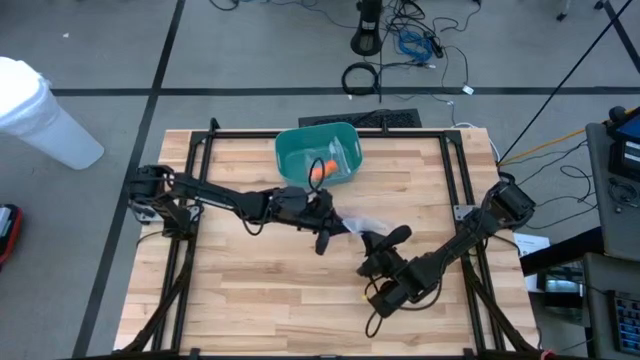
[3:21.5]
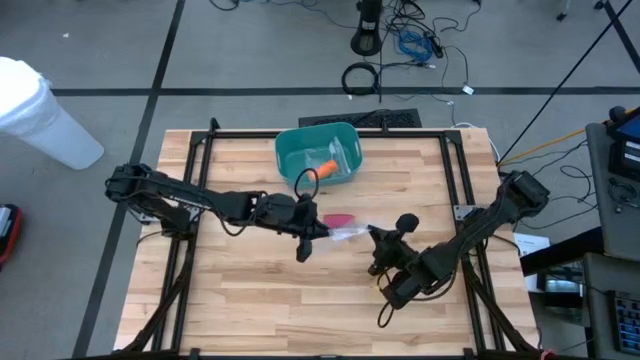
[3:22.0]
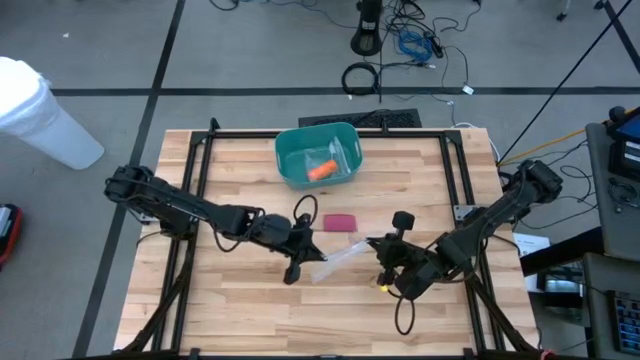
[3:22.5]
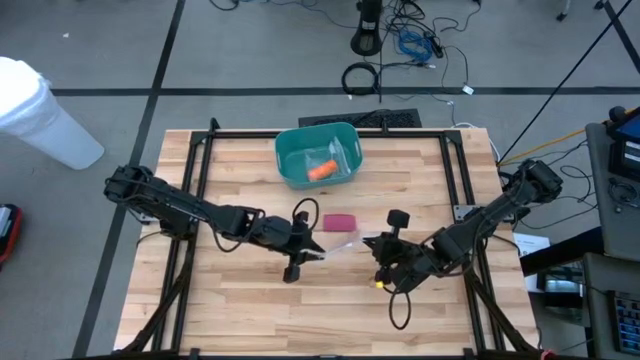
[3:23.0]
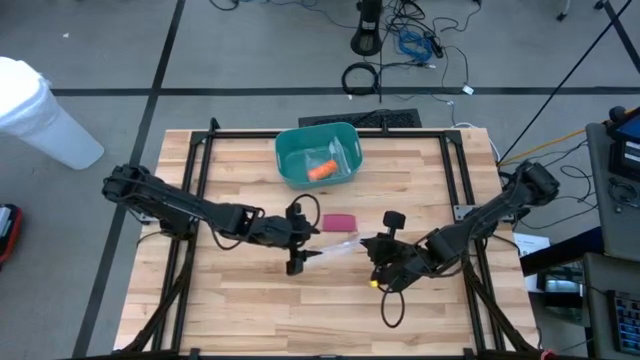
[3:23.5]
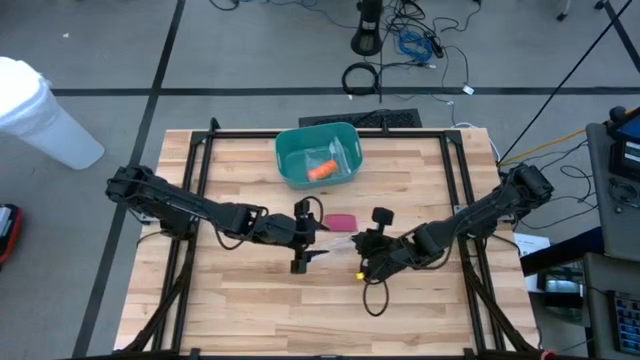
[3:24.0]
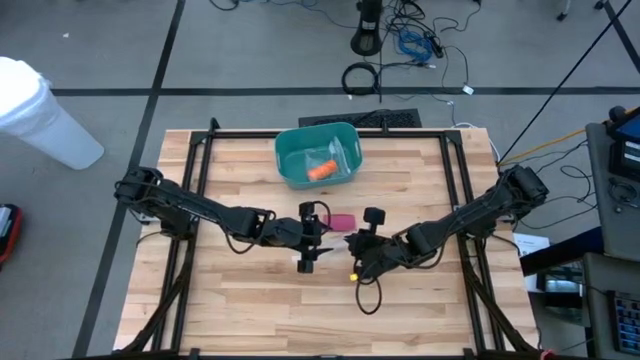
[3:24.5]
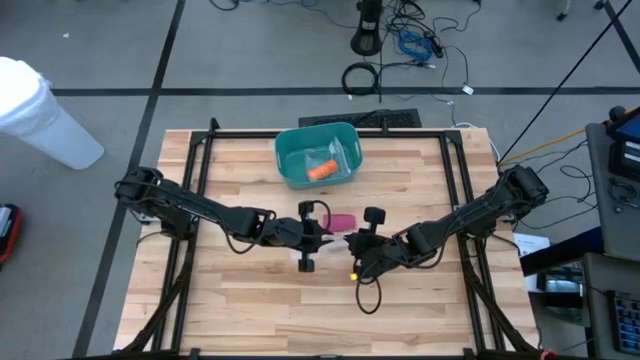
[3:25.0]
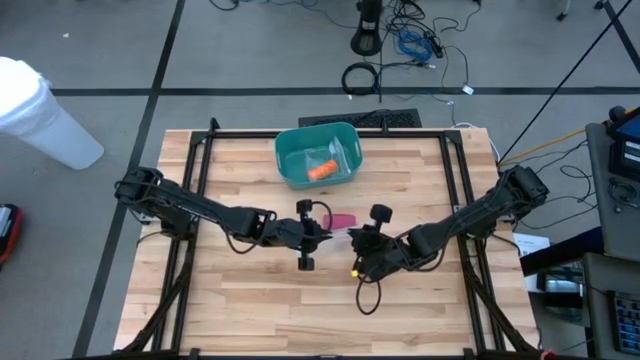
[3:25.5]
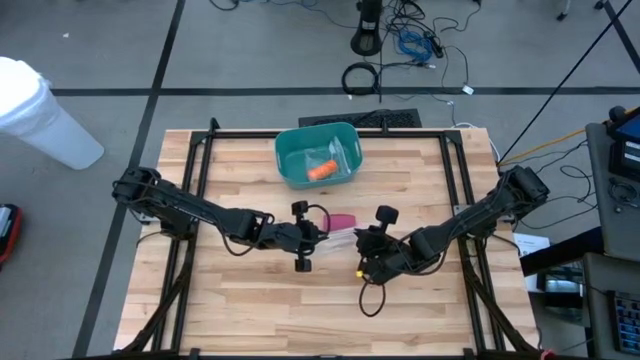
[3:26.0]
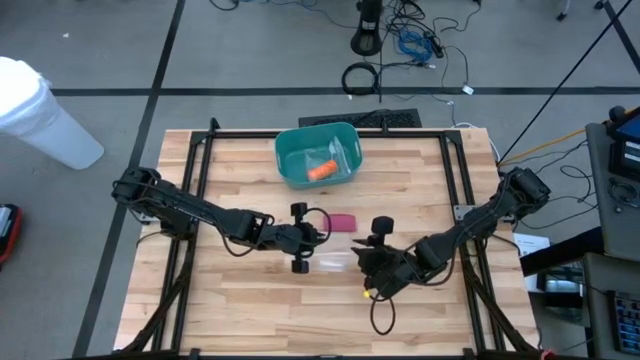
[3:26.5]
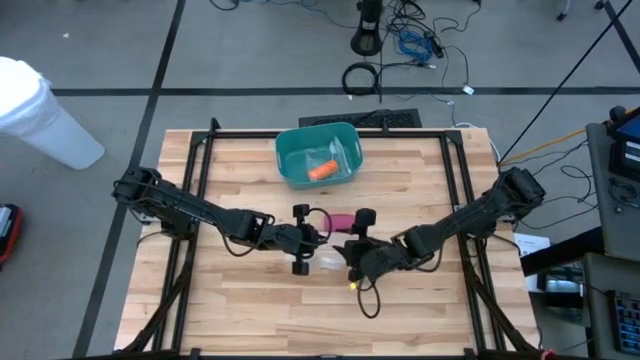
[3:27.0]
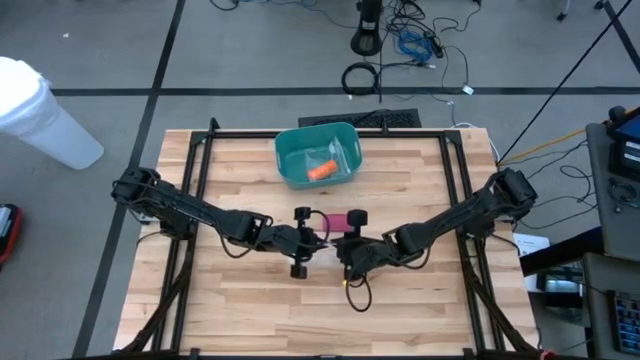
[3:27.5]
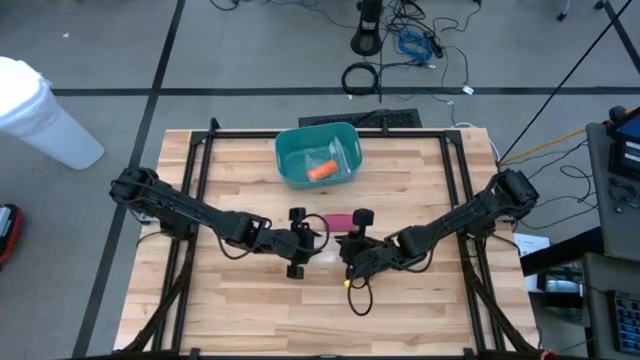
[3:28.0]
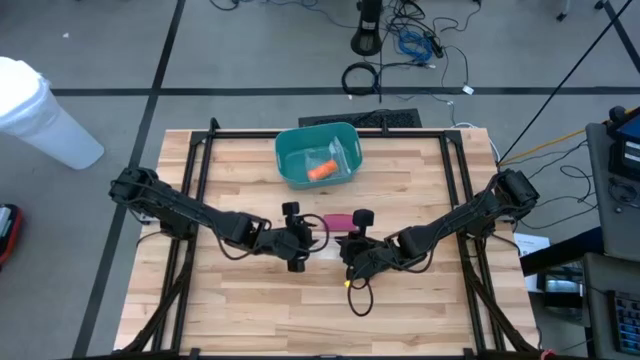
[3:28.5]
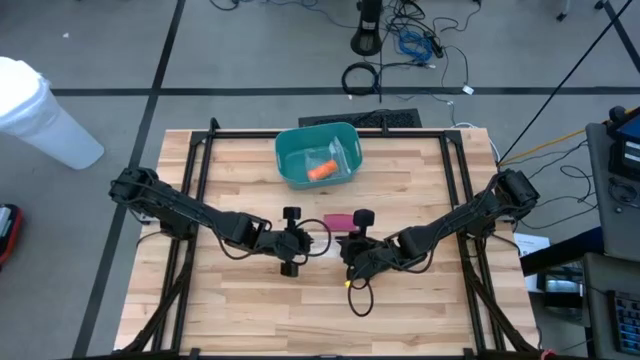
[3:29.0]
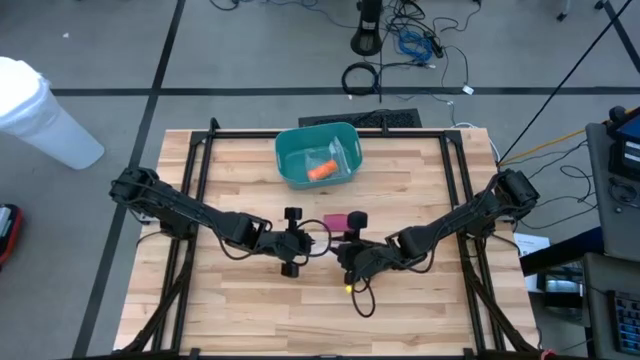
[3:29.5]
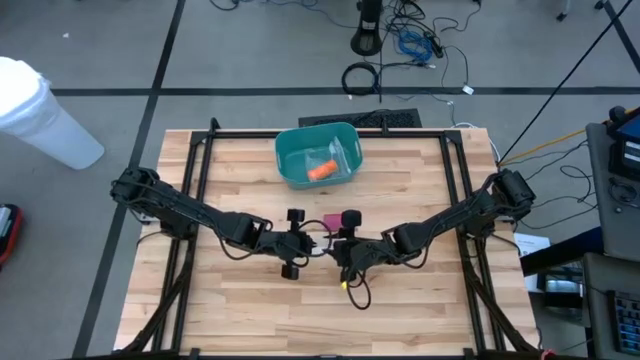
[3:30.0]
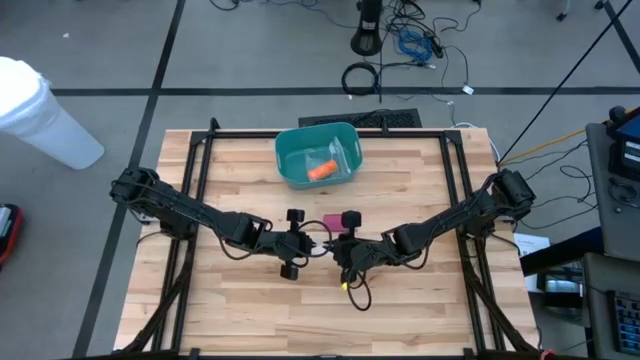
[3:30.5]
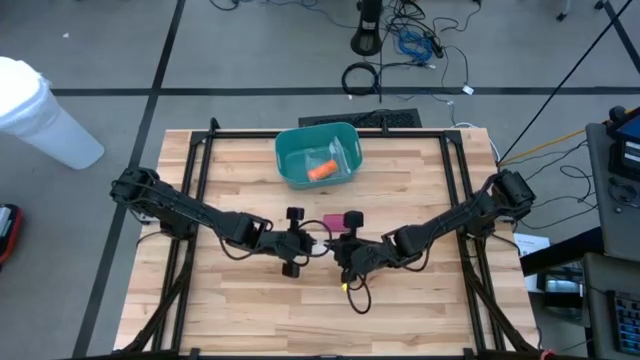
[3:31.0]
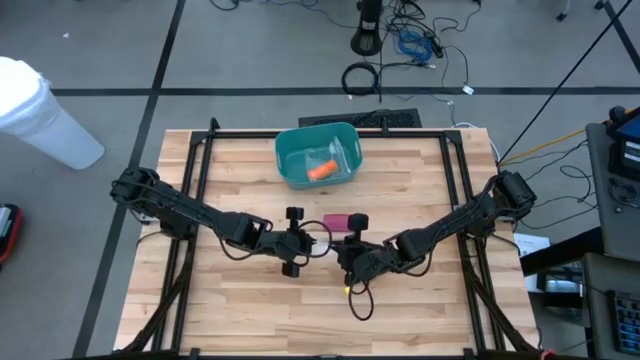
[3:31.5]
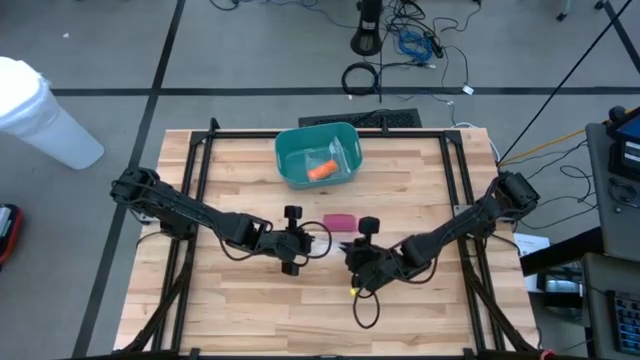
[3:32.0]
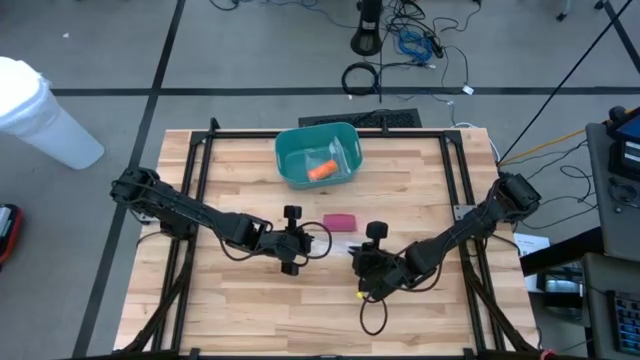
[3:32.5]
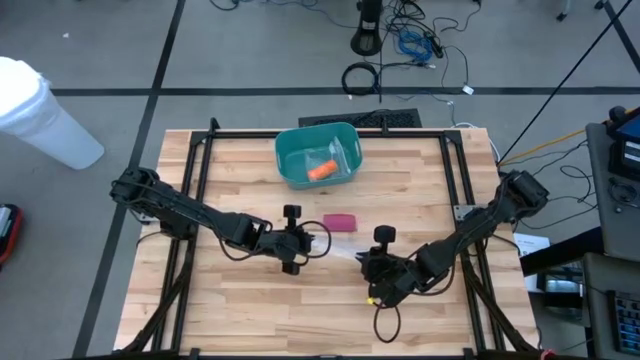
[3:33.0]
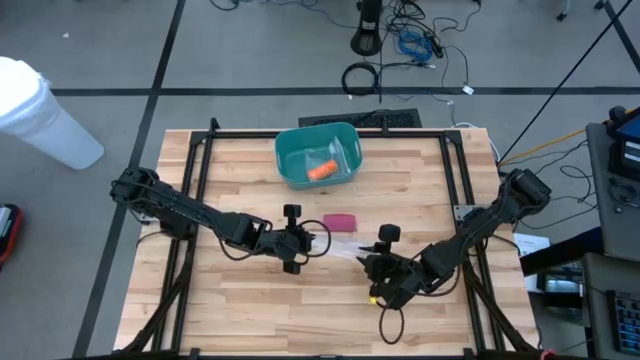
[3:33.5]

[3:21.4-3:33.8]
Task: Roll bandage
Open the transparent zip bag
